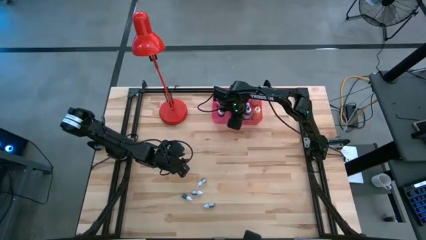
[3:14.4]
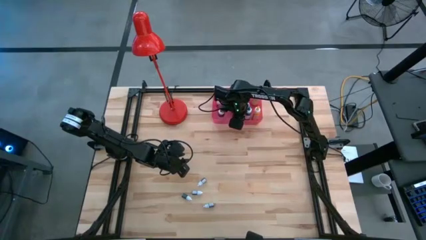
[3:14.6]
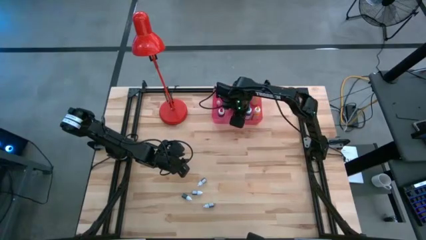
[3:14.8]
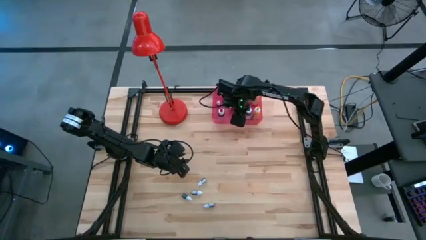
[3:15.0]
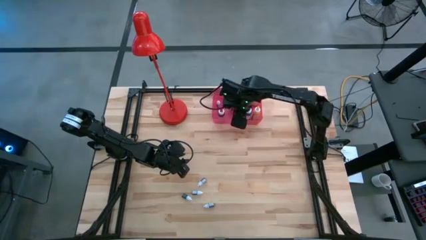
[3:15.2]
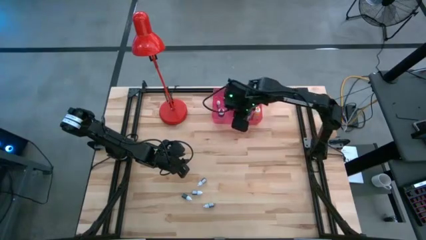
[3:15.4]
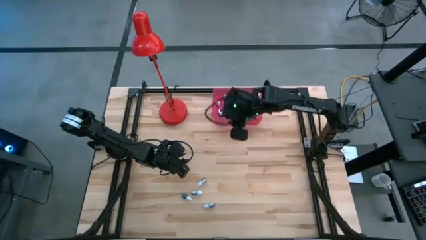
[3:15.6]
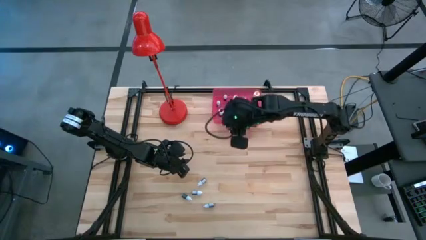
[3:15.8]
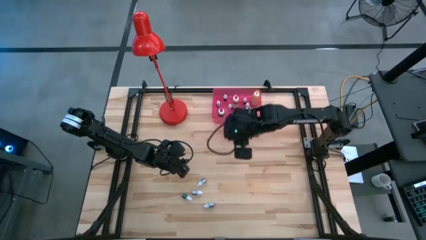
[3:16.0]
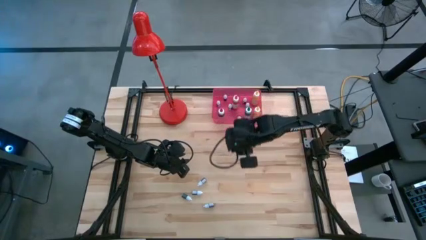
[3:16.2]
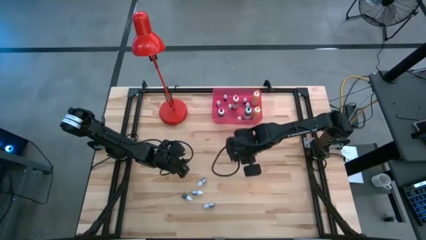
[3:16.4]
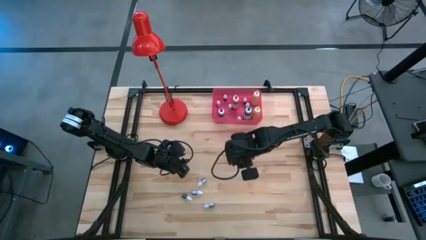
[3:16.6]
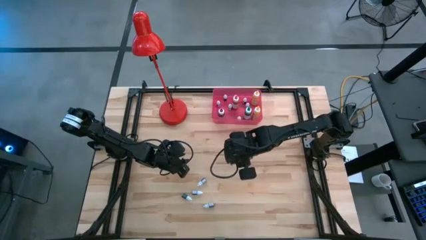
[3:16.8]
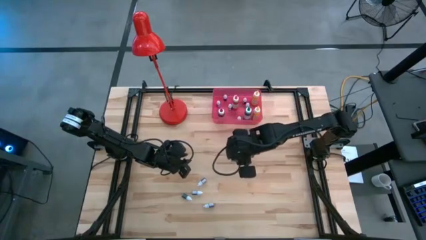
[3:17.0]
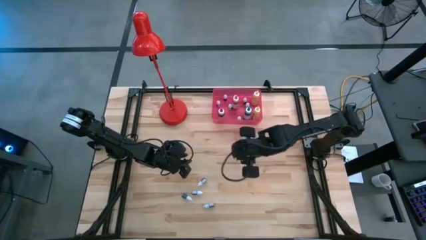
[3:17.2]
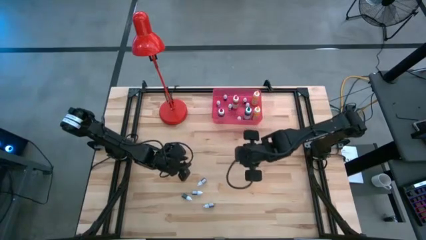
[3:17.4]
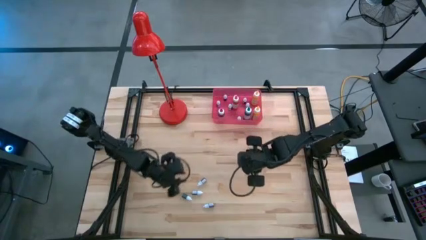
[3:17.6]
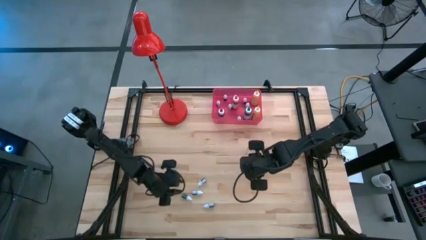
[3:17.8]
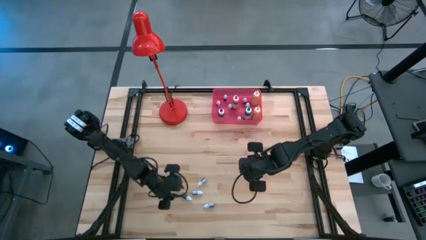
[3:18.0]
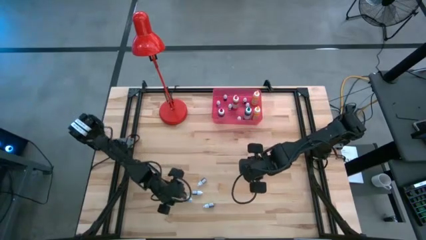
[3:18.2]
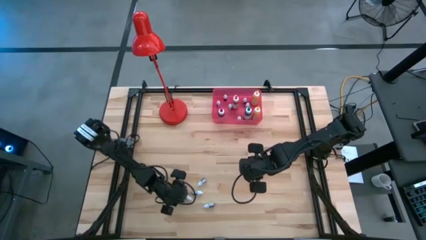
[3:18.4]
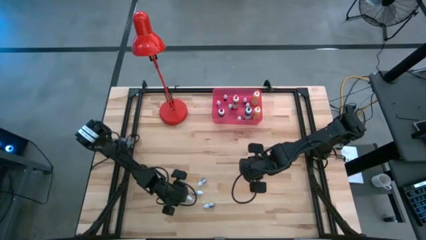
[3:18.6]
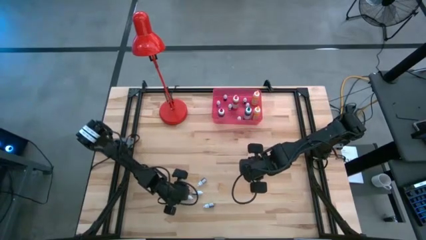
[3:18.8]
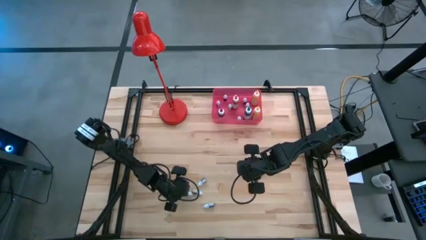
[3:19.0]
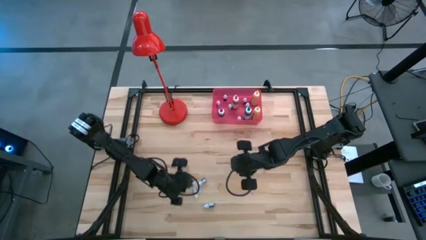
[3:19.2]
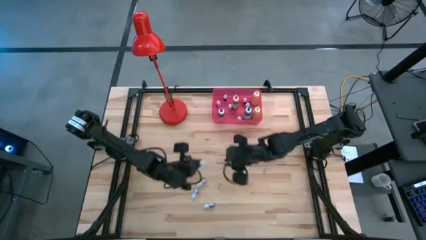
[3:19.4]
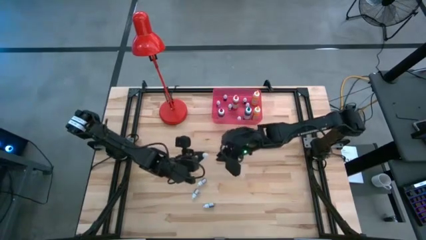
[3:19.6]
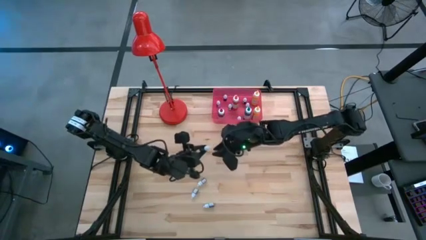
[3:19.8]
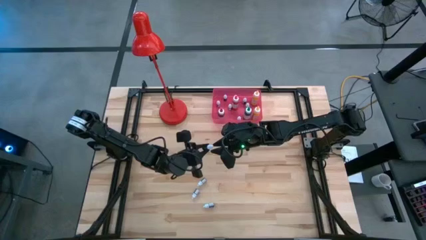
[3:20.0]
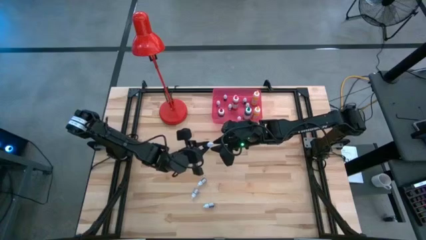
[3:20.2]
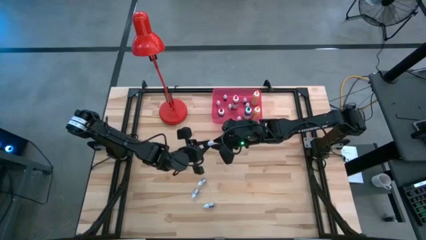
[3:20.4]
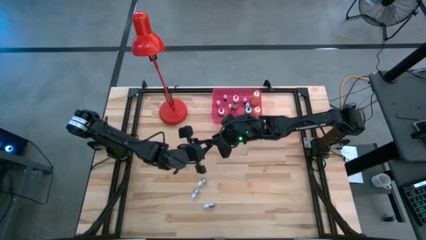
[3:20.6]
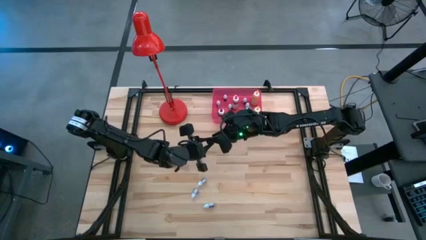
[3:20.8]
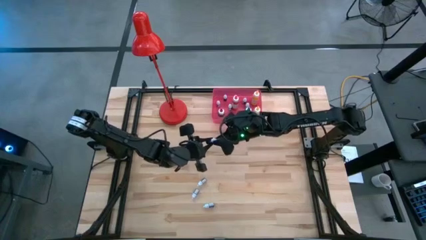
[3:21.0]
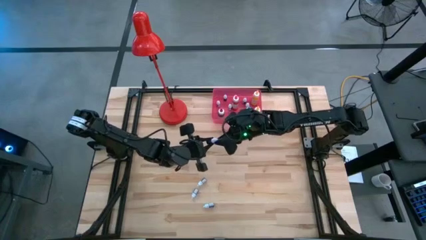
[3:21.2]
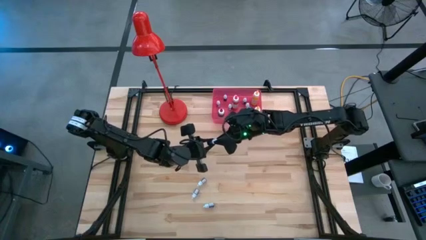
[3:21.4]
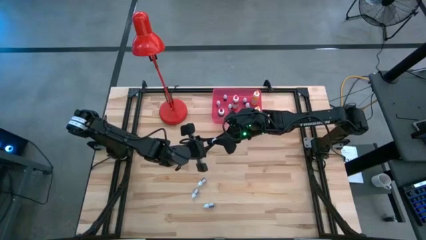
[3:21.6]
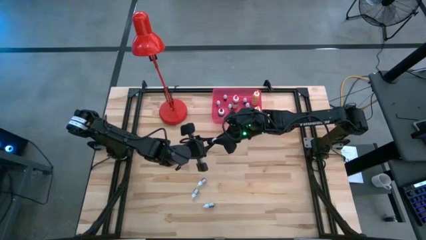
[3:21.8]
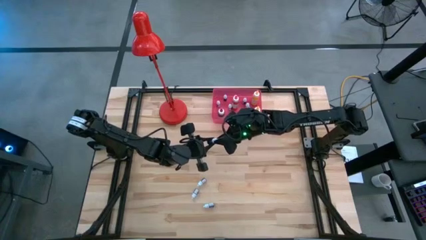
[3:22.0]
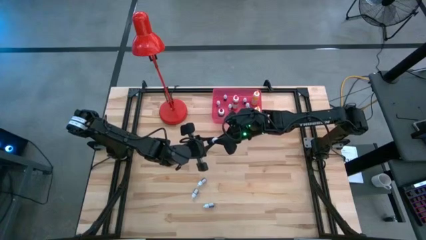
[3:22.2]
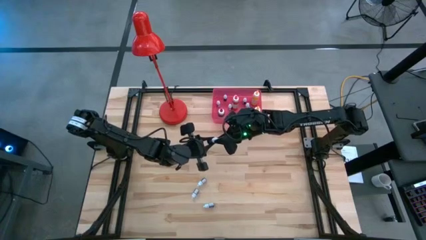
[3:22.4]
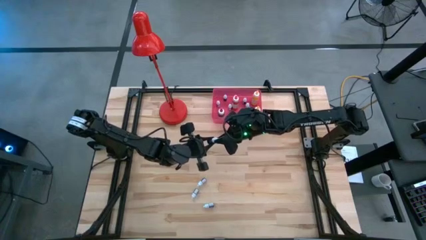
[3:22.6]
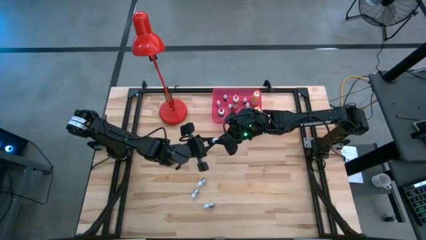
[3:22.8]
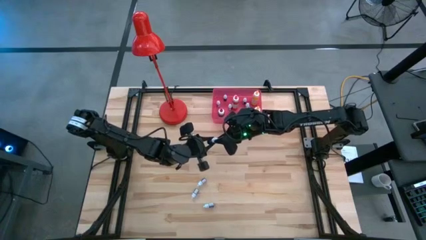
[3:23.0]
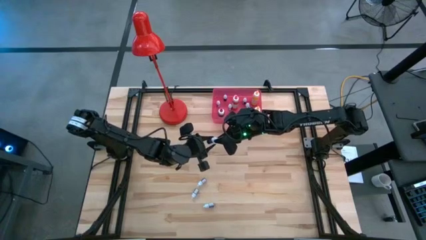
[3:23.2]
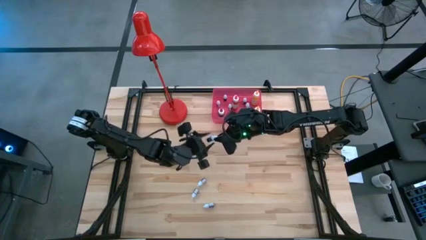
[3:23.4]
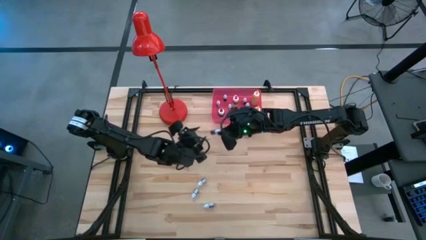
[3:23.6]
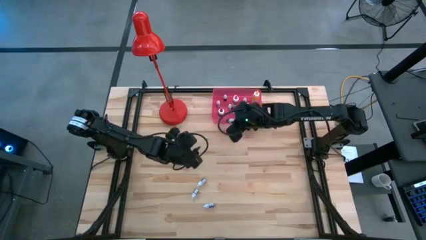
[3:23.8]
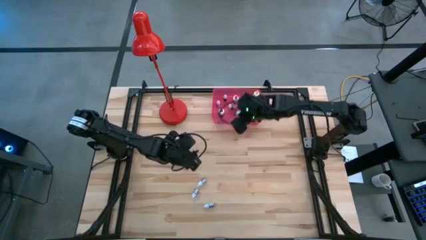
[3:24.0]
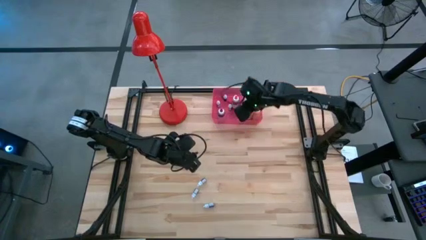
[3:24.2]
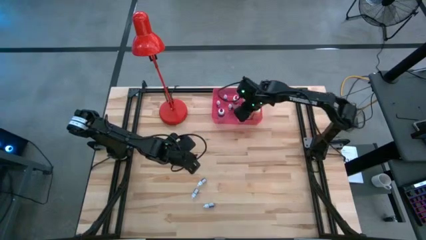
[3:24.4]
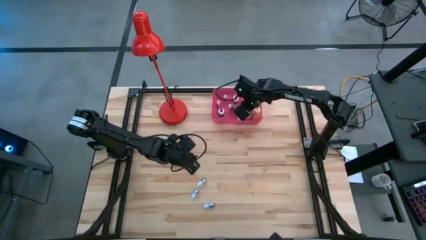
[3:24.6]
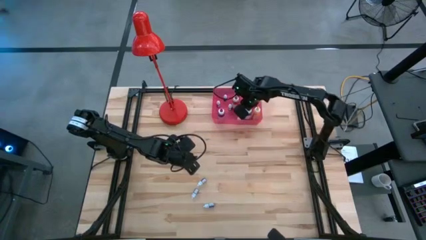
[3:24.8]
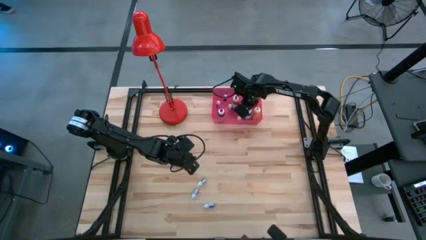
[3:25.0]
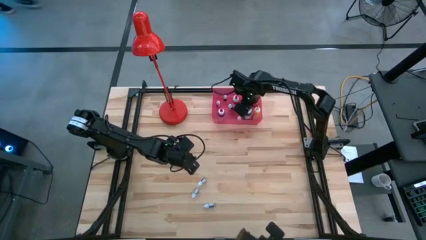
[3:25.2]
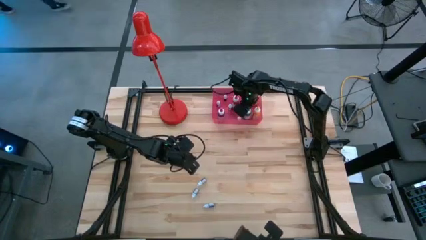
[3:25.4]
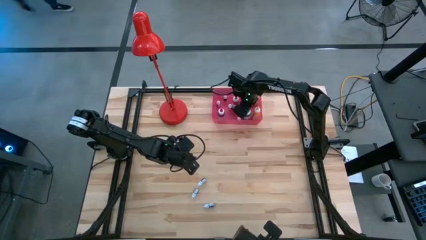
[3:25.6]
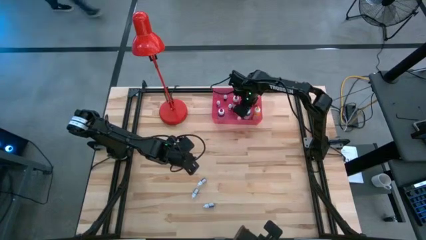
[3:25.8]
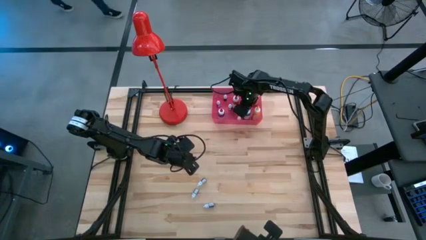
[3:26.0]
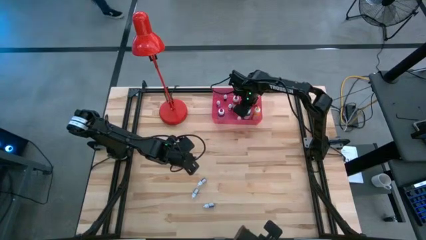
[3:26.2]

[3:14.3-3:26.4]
Task: Pick & Place food coloring
Put the small black food coloring bottle into the red bin

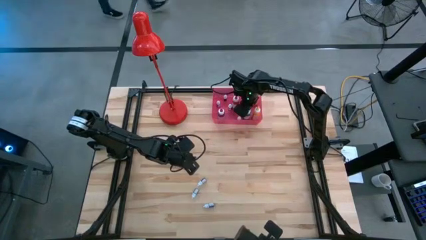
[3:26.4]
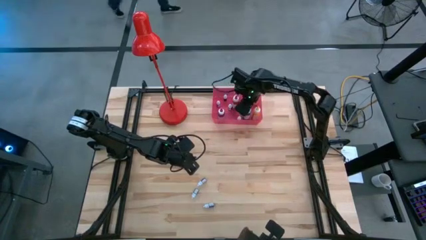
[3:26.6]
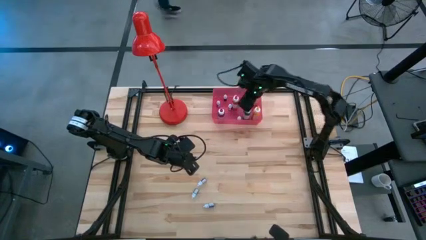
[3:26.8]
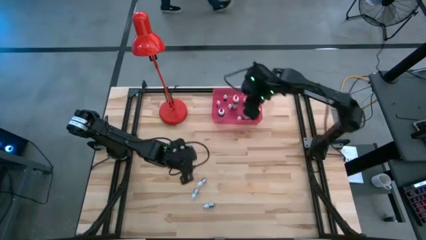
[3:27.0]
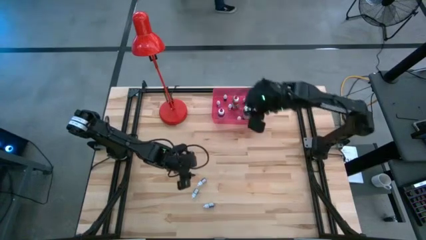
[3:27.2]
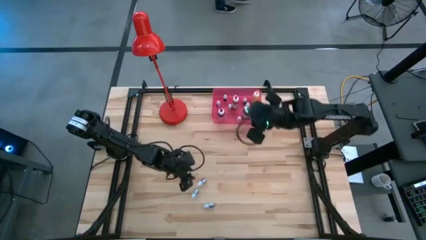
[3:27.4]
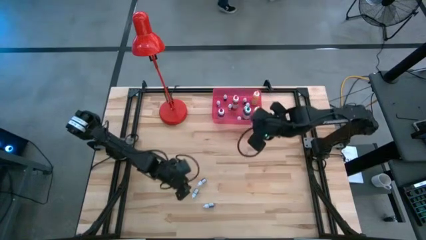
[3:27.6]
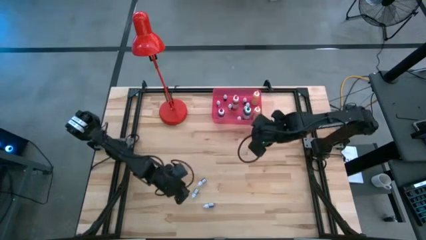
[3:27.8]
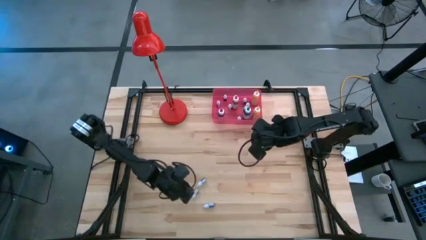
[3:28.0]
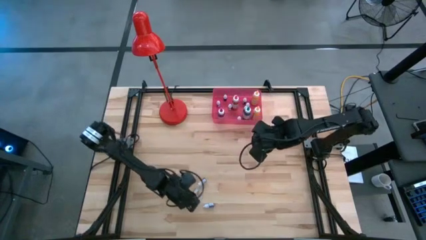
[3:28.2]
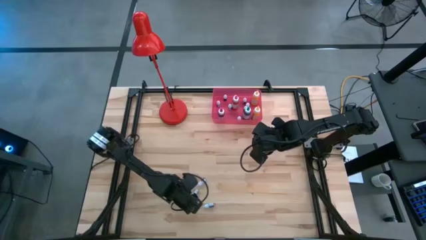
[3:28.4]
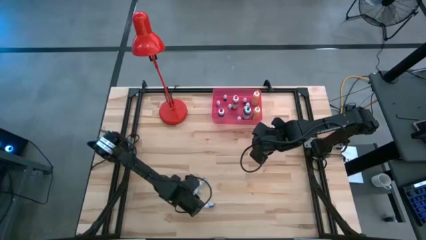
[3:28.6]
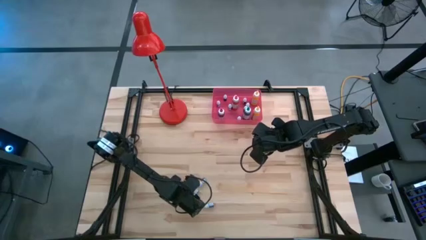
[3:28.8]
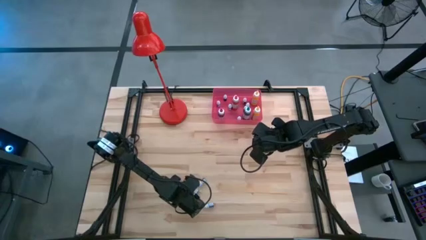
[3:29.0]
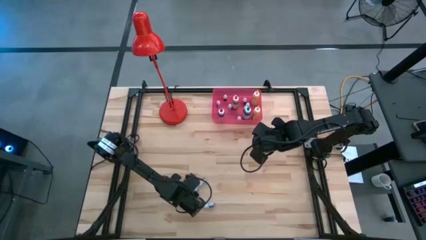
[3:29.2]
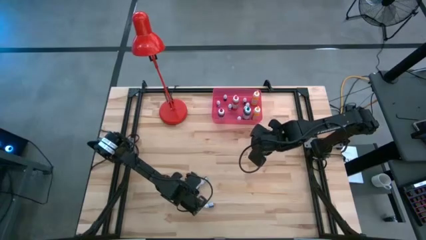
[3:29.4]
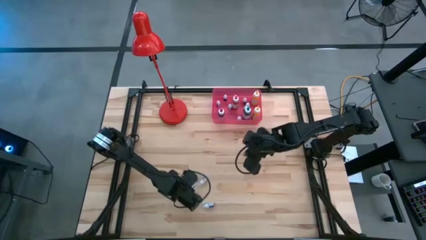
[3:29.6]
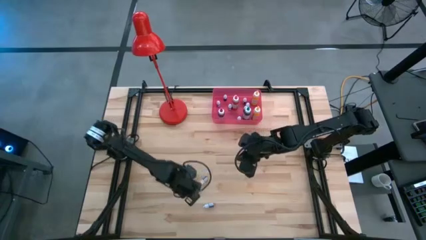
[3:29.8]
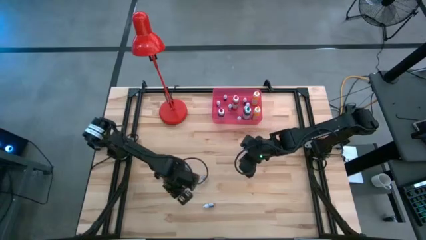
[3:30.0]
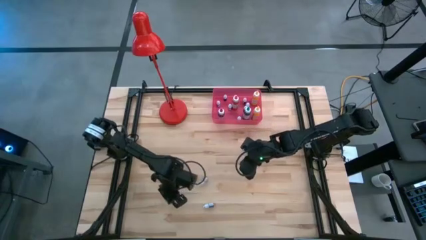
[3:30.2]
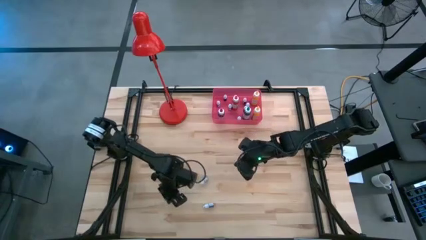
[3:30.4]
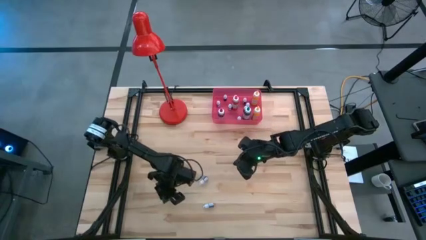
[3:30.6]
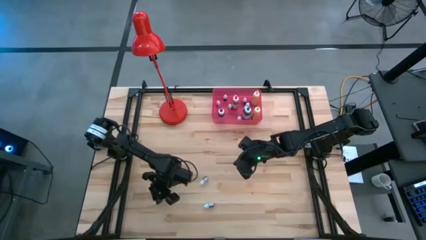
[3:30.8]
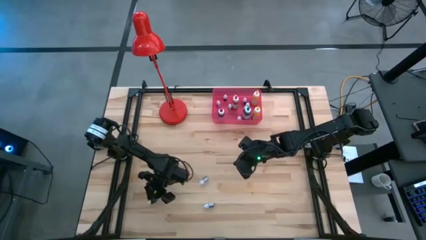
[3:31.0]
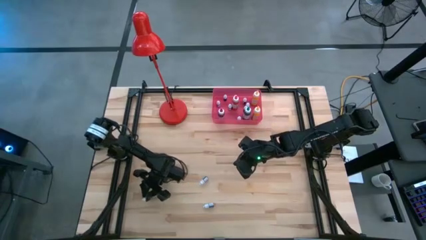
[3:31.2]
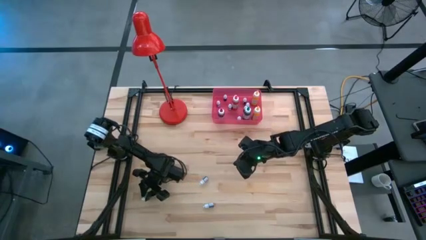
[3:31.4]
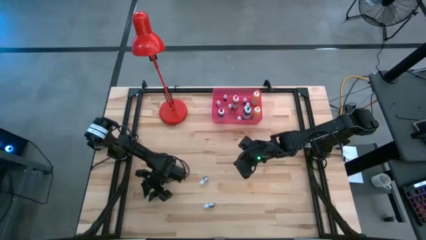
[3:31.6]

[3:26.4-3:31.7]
Adjust the small blue food coloring bottle
